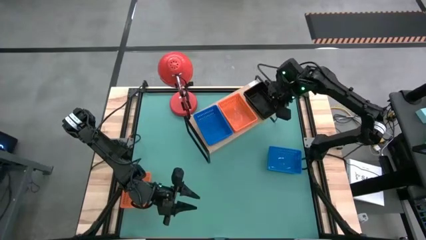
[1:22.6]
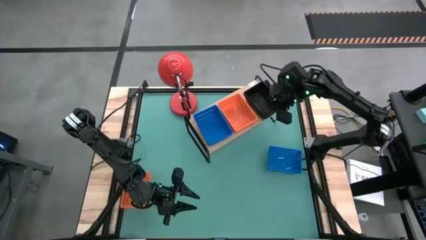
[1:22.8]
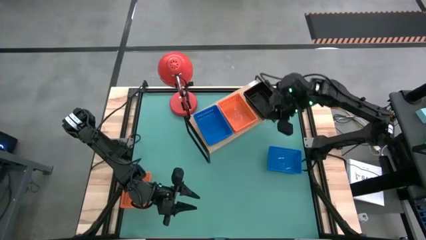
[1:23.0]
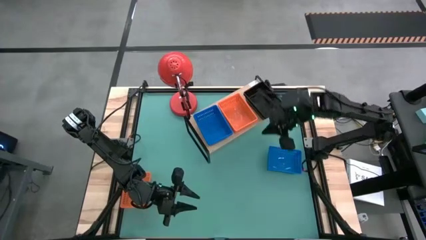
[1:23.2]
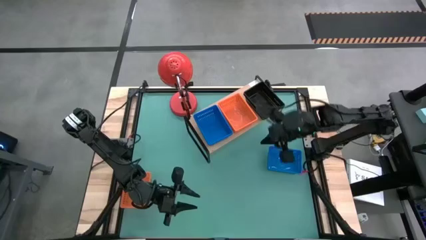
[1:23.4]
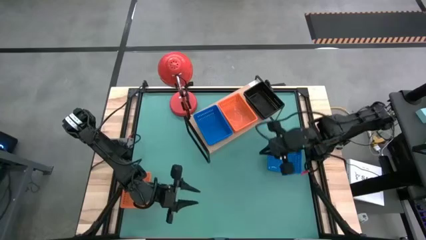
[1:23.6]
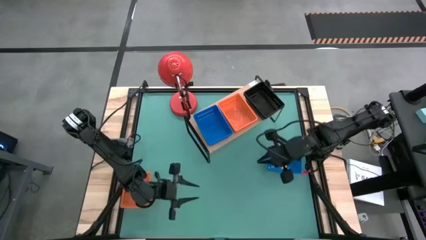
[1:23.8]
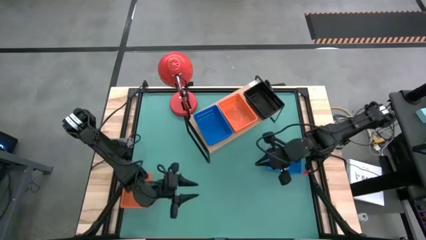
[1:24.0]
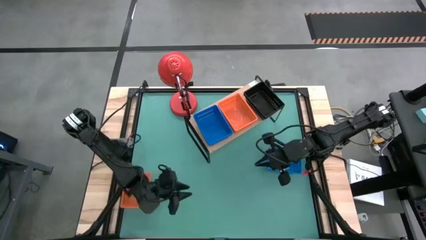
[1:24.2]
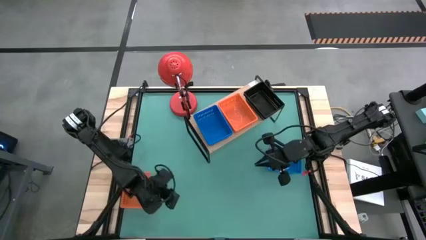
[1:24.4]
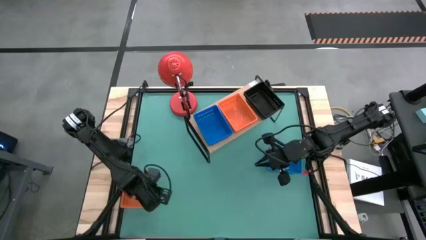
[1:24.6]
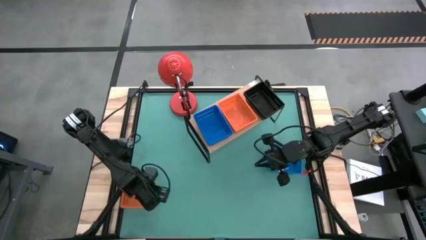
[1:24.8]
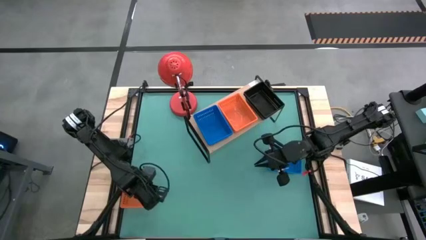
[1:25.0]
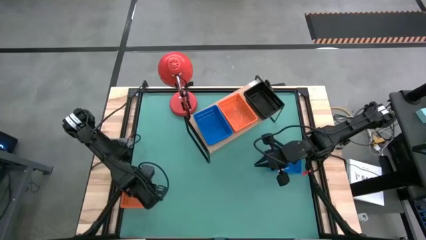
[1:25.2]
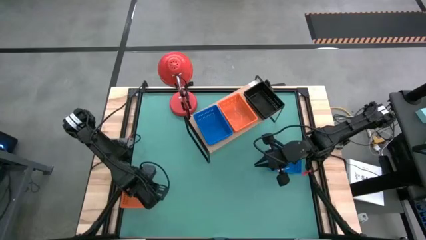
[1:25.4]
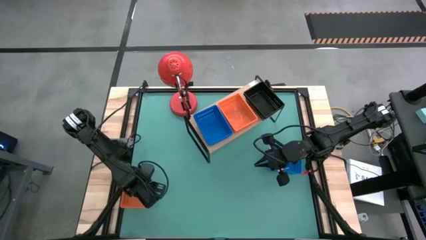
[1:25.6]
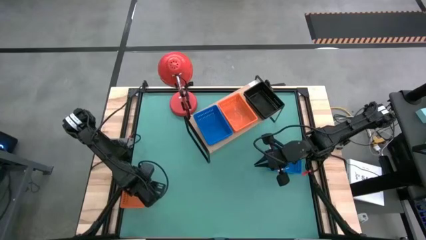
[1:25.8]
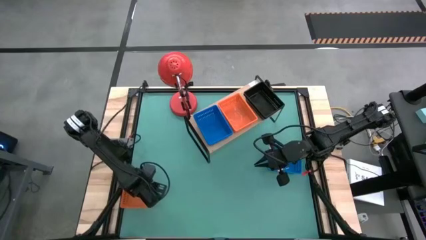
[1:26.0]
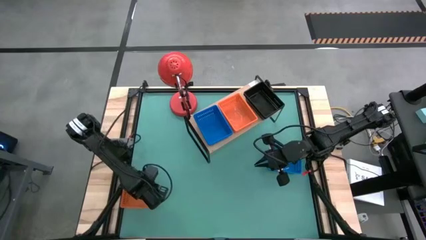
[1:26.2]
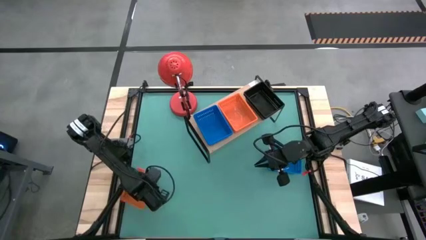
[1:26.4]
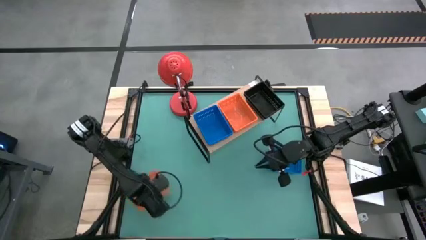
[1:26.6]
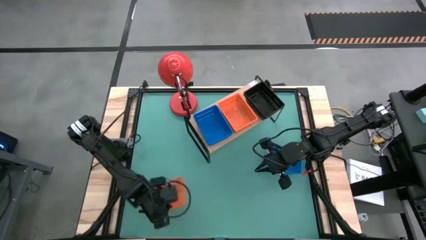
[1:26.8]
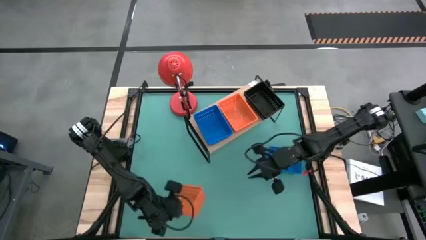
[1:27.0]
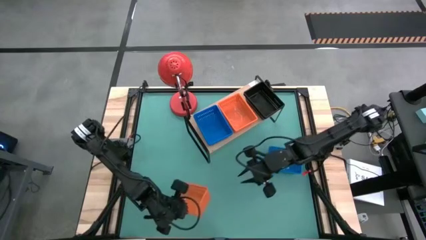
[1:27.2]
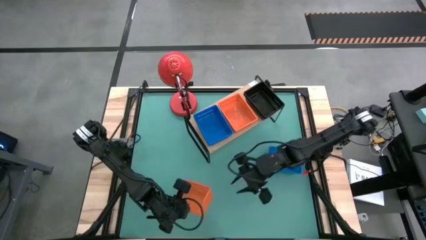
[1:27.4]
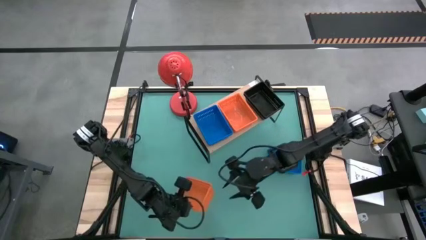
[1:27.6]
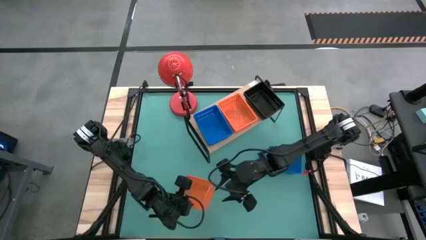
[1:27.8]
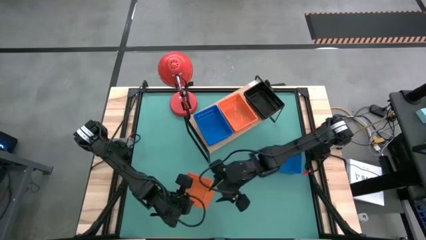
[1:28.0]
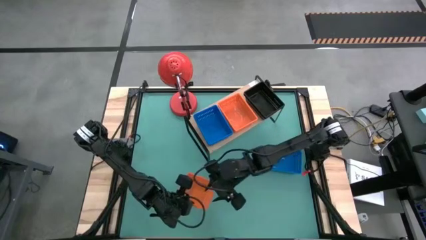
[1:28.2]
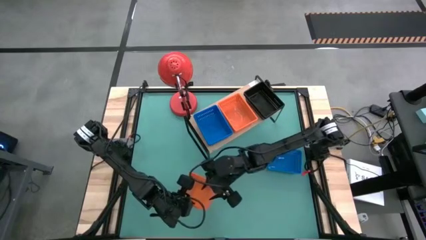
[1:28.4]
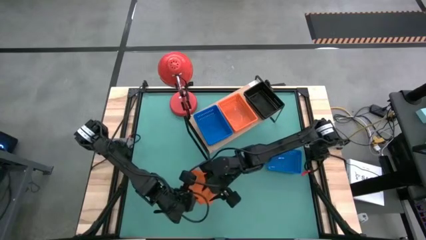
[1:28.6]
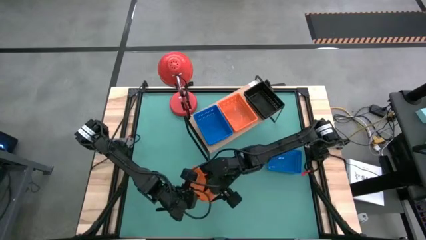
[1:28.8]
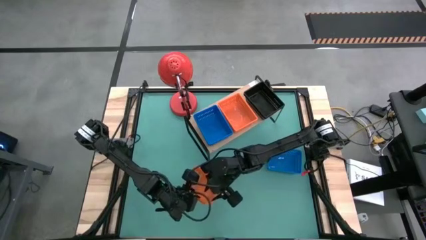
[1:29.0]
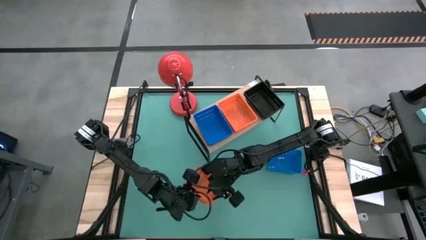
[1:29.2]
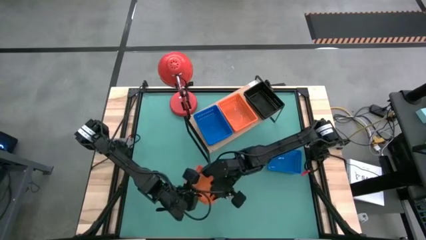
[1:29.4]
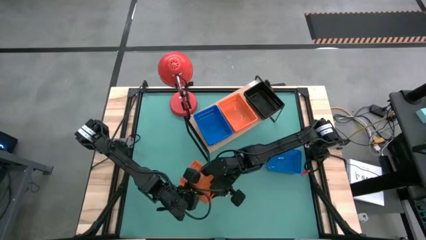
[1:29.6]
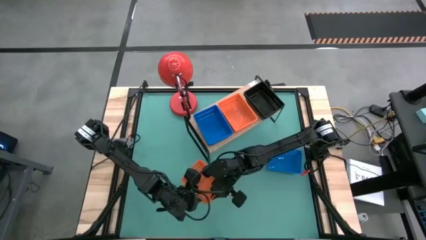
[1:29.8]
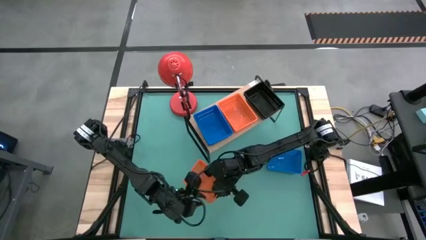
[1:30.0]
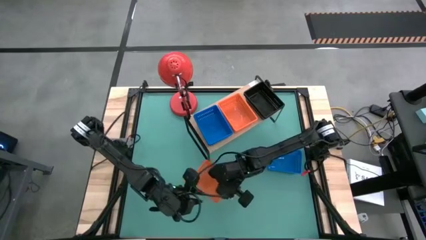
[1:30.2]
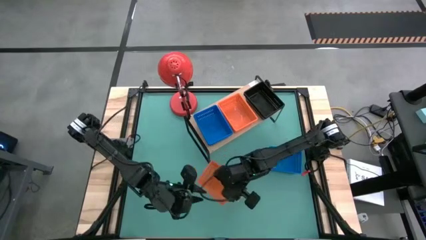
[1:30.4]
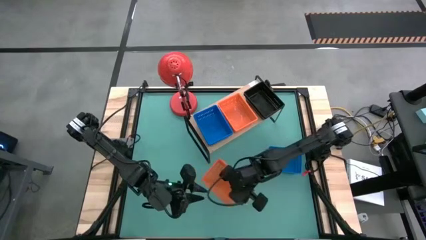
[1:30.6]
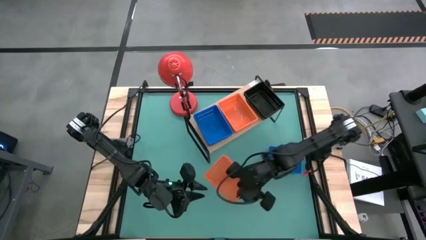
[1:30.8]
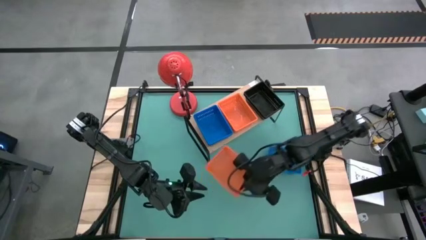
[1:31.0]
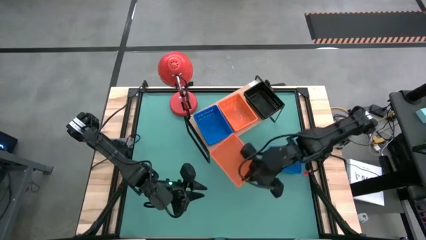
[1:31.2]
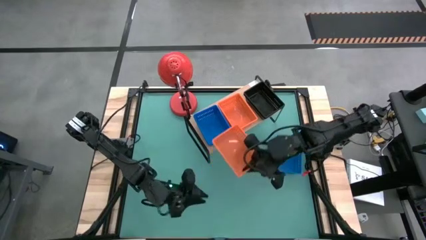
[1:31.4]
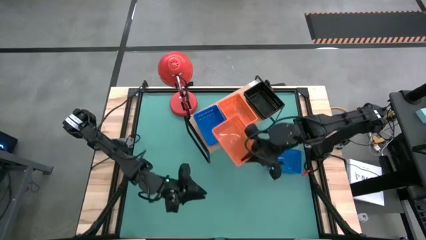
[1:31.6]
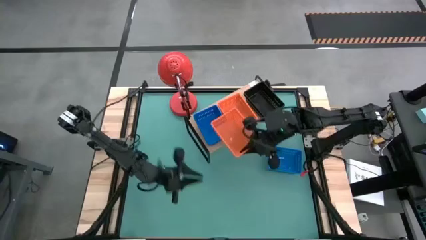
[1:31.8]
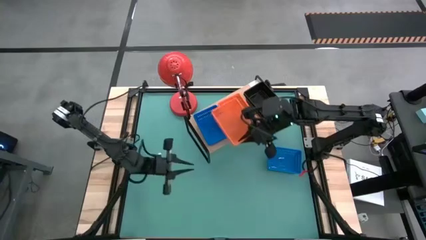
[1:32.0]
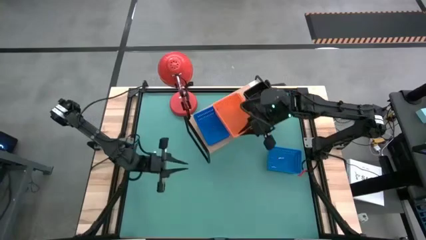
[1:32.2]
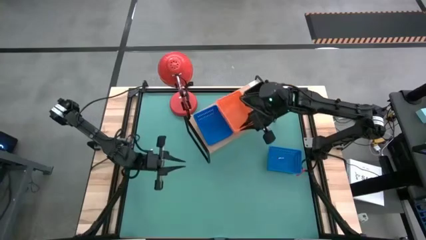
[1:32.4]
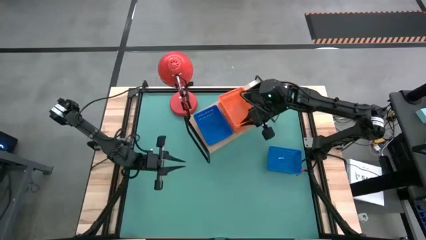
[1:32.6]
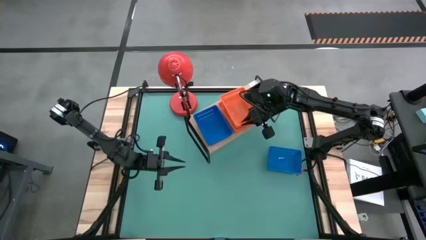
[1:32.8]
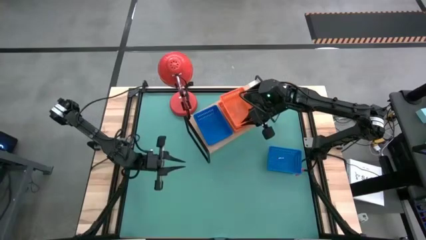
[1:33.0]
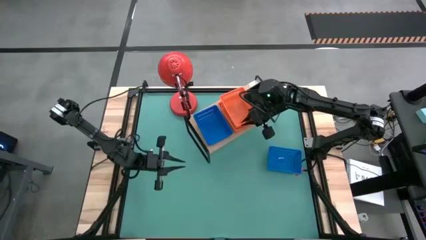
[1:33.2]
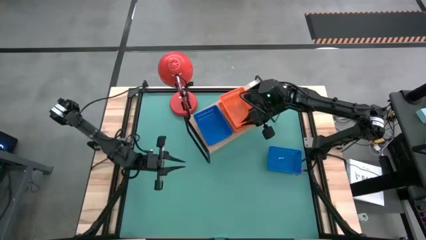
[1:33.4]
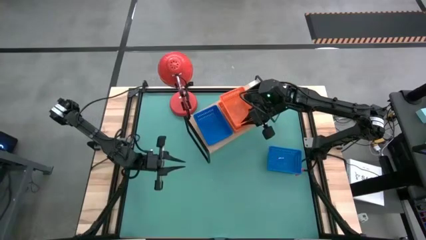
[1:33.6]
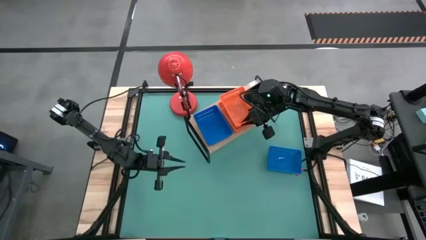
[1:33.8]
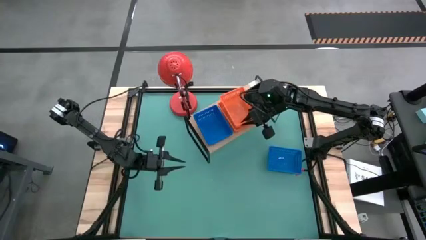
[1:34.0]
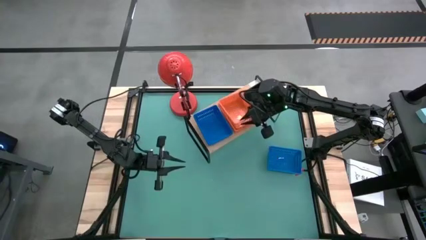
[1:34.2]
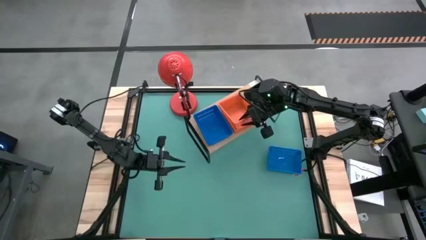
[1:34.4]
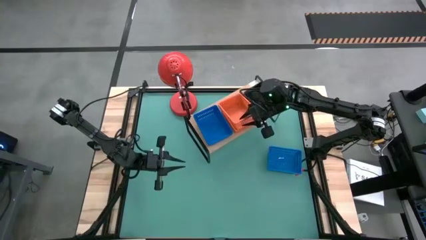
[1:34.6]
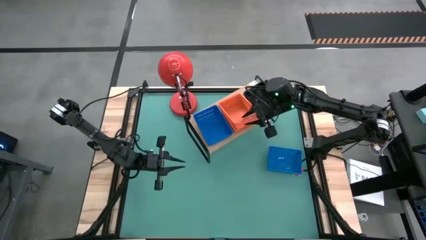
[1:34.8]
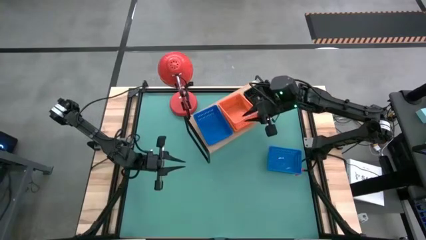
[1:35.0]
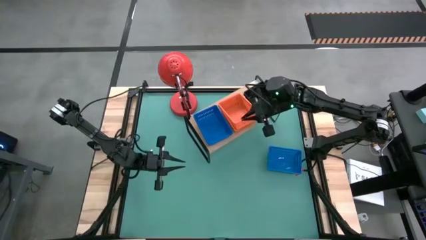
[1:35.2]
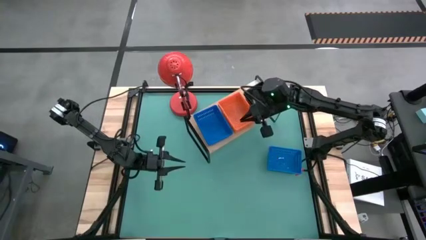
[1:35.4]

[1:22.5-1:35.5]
Task: Stack baskets on shelf by color
Stack the orange basket on top of the orange baskets on the shelf

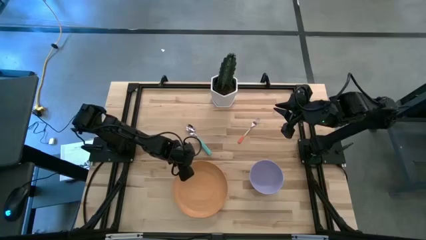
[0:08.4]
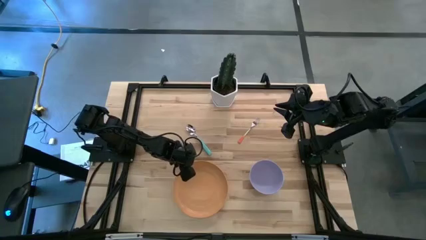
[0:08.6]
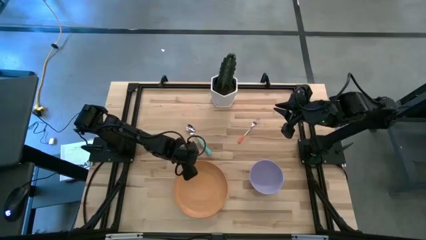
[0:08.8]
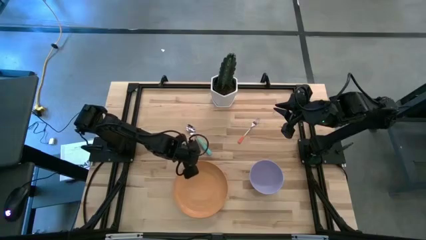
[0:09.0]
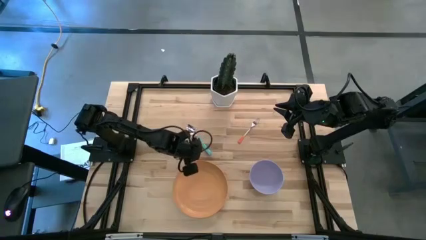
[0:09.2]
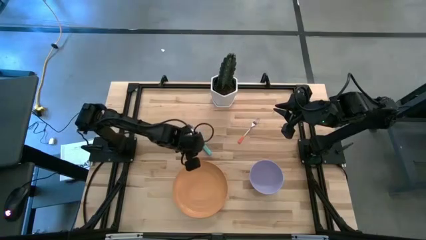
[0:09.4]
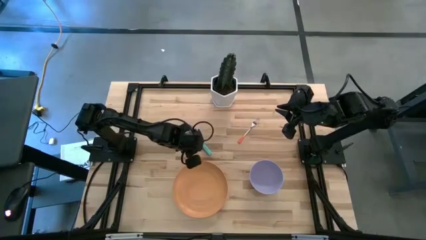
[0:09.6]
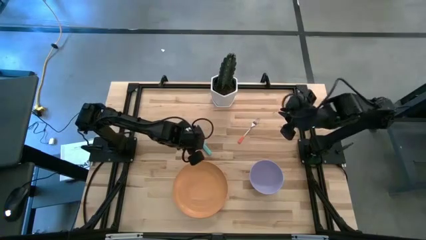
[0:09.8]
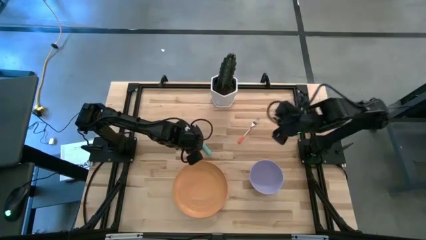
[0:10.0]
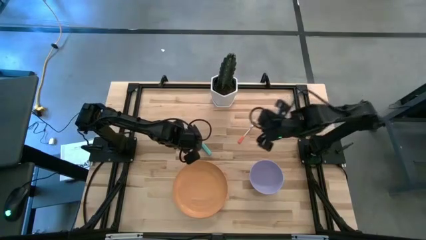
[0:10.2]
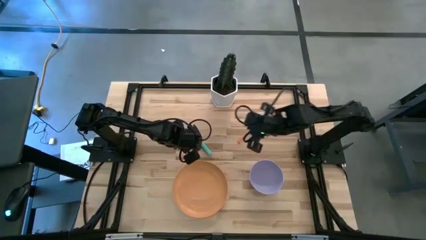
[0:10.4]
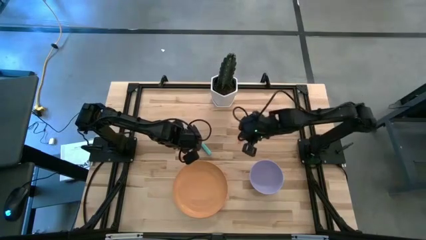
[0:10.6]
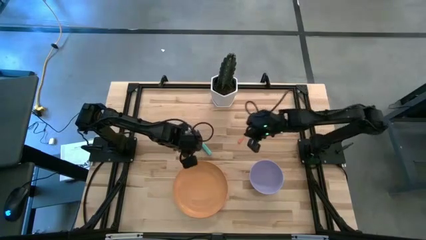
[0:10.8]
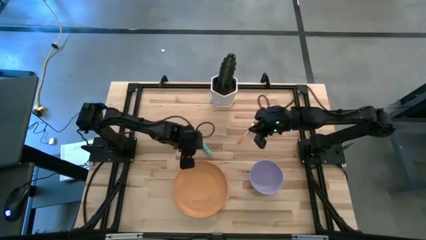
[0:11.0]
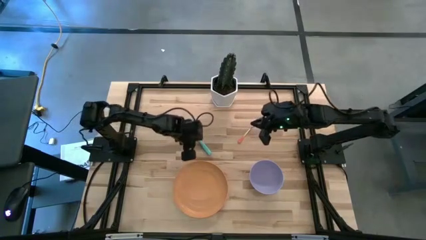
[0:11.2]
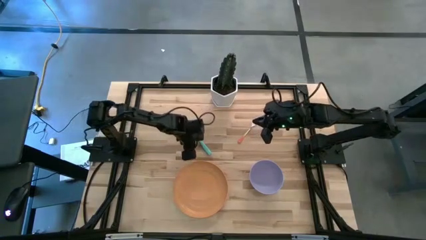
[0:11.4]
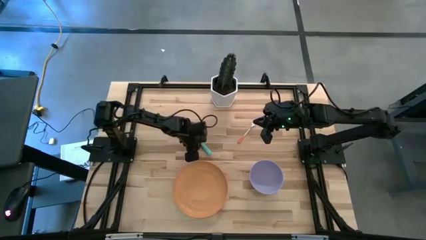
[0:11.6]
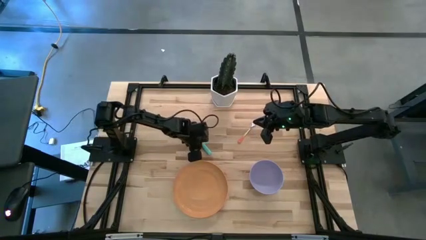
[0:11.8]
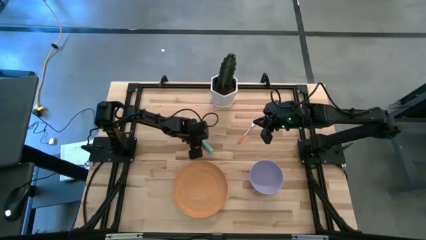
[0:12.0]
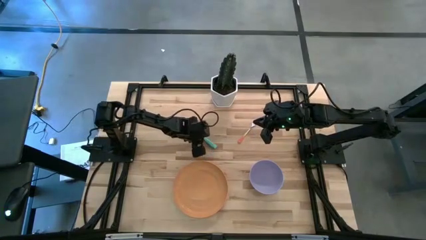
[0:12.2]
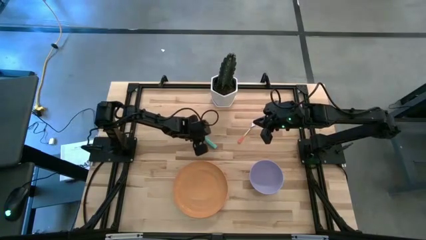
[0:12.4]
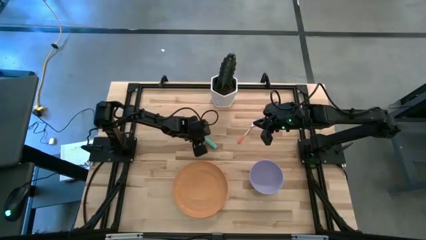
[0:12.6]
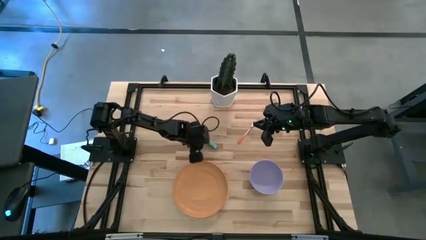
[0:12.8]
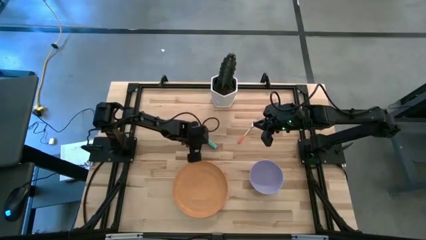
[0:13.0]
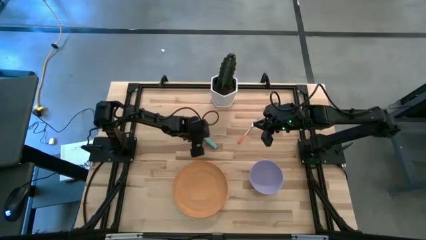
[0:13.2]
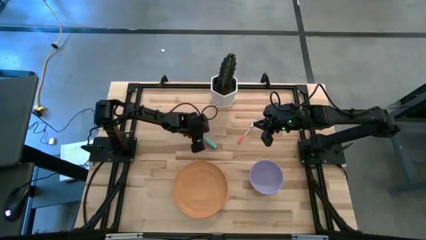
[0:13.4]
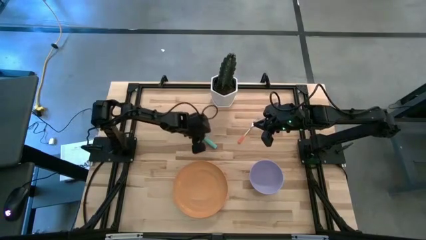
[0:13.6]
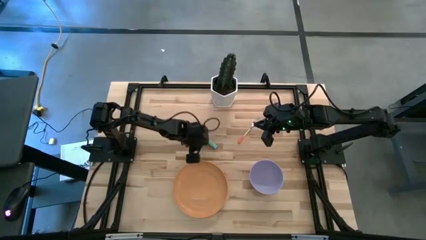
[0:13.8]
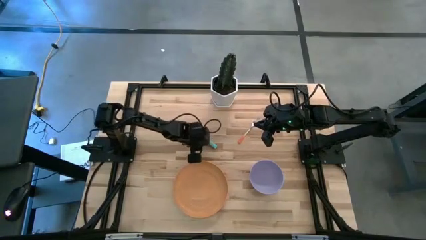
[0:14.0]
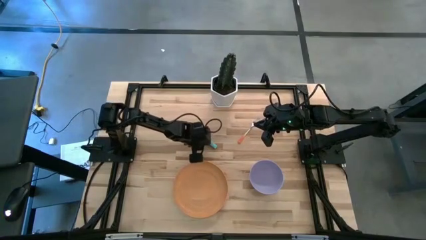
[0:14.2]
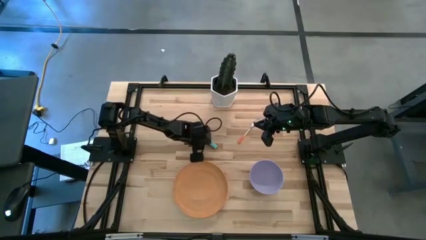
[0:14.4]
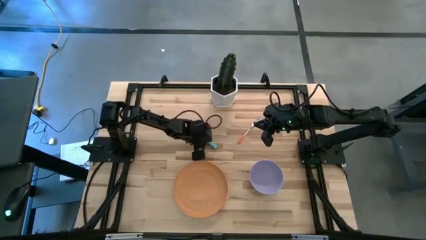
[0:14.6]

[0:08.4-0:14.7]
Task: Set table place
Adjust the green spoon
